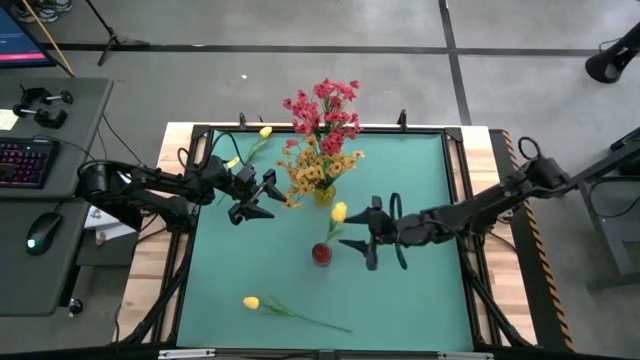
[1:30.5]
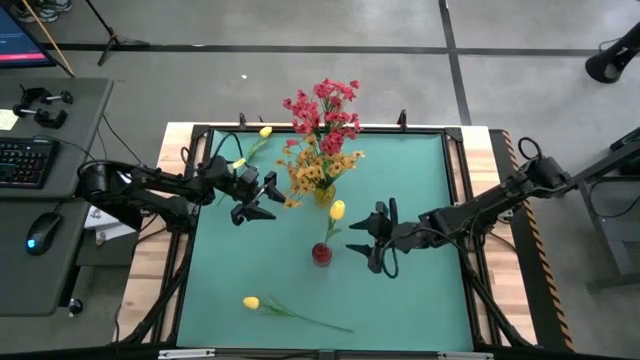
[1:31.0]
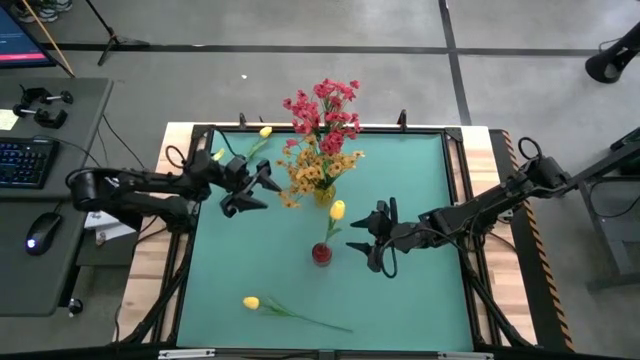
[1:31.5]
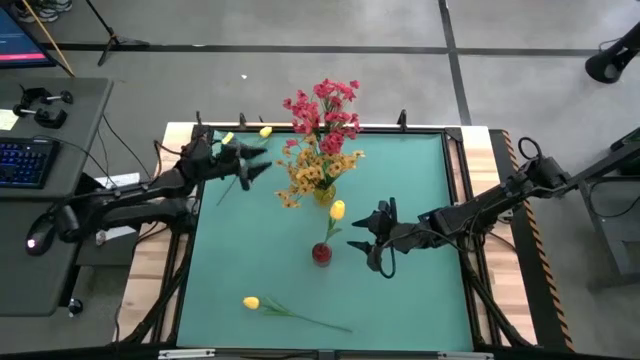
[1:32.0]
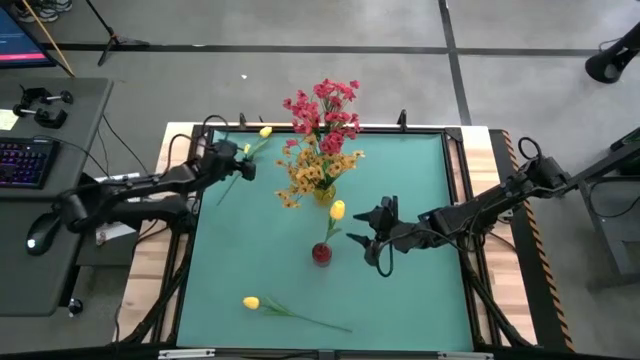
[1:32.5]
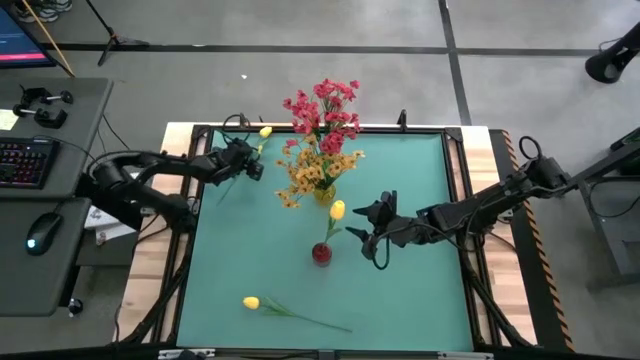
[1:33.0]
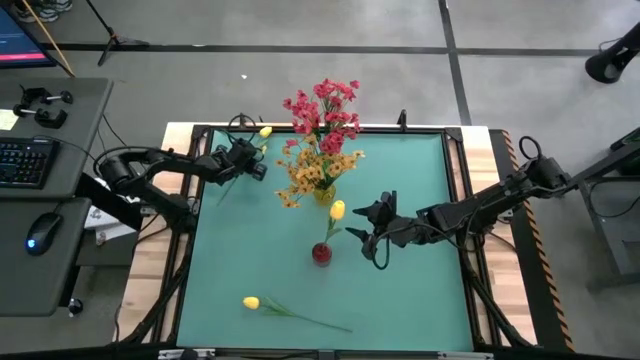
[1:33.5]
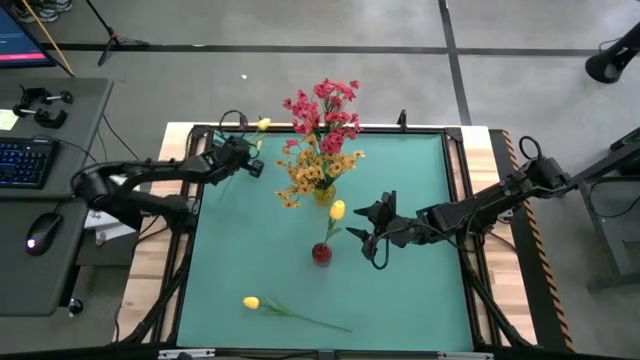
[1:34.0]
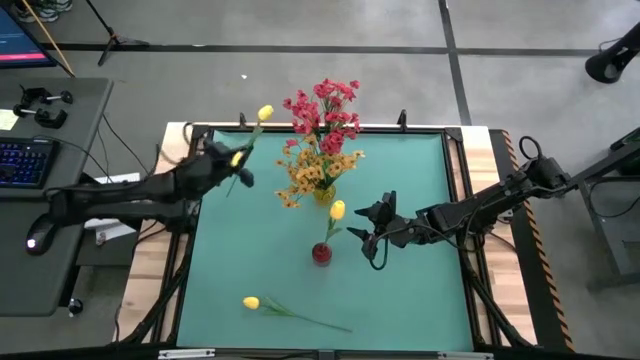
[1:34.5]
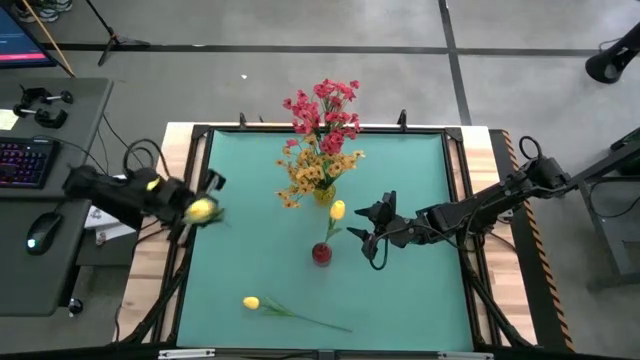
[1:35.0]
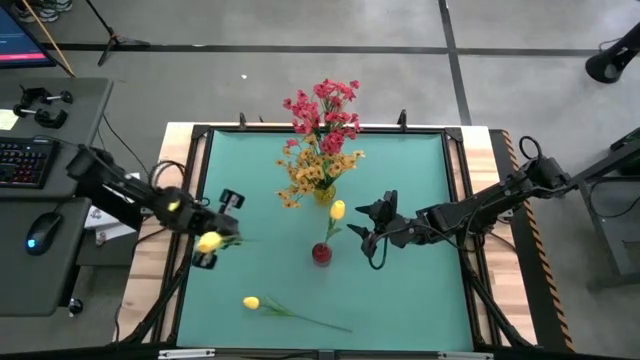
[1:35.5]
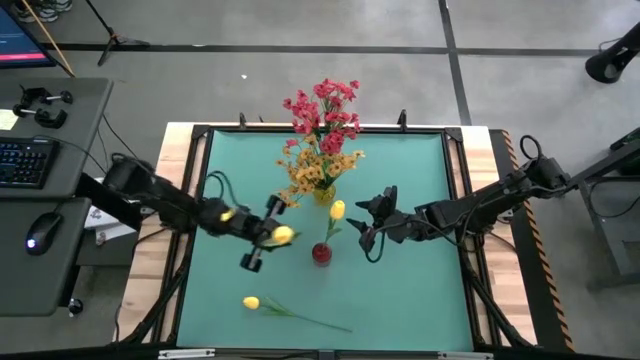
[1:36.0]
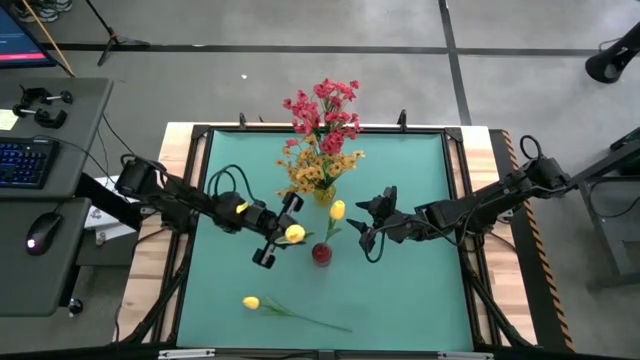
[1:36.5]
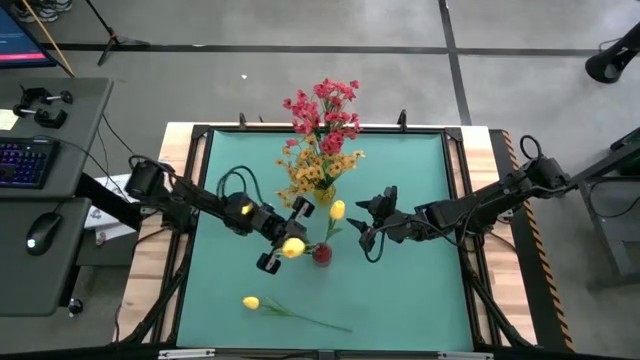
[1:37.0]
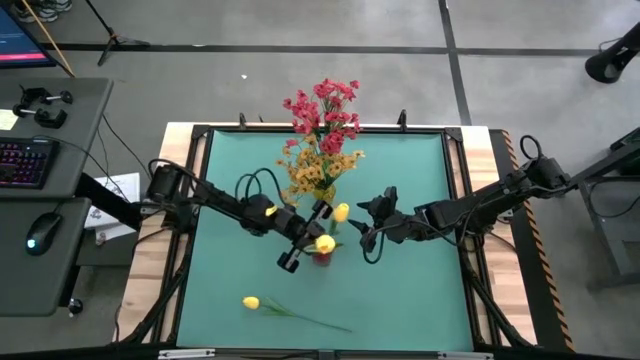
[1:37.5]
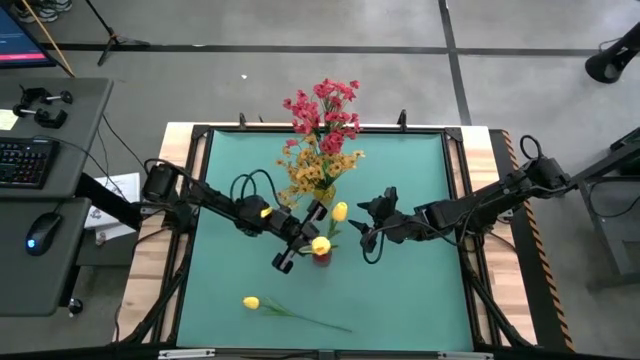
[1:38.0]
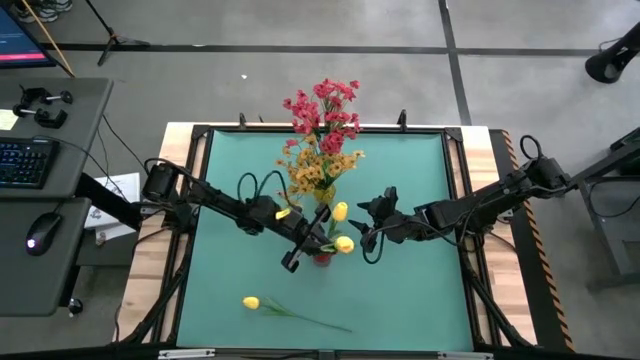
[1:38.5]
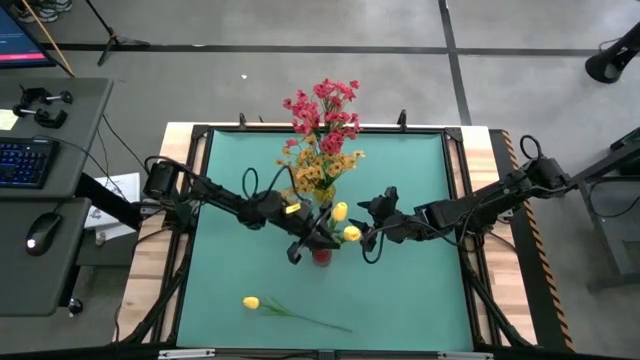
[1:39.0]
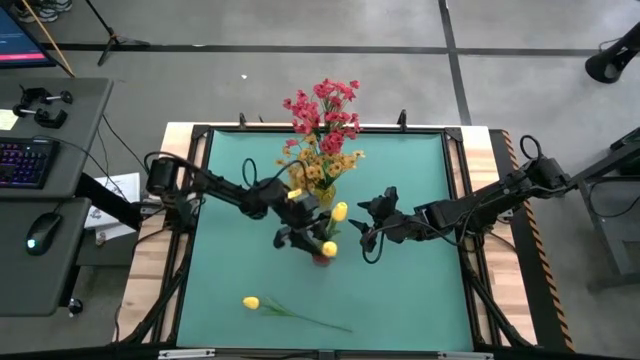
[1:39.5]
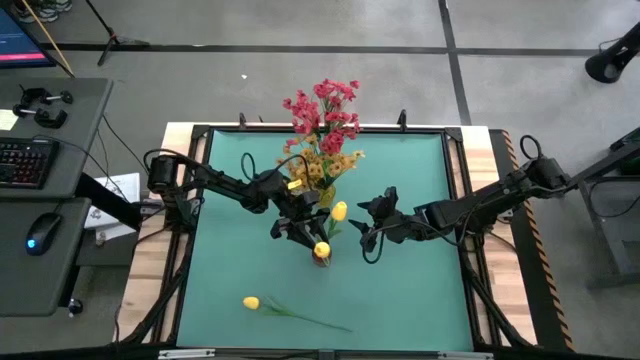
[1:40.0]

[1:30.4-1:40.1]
Task: Sort flowers into vase by color
Put the top yellow tulip into the red vase

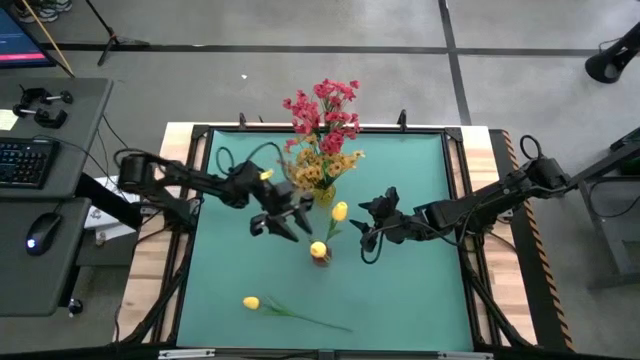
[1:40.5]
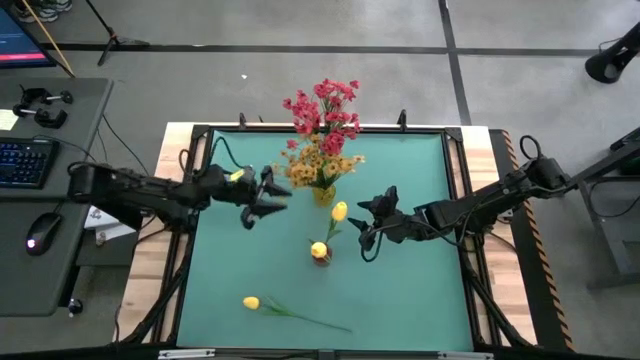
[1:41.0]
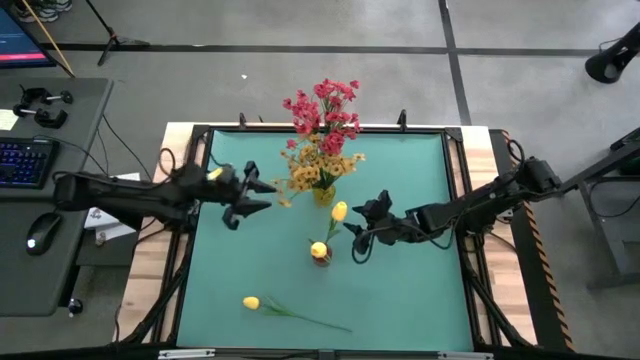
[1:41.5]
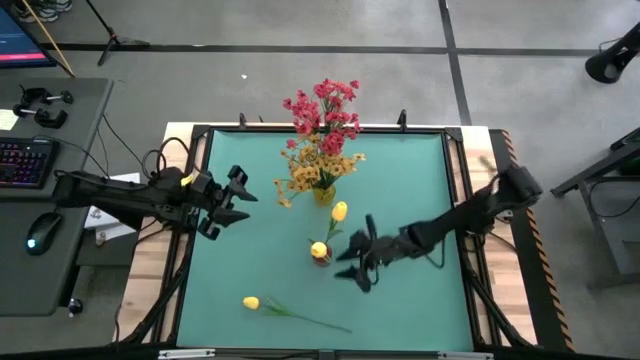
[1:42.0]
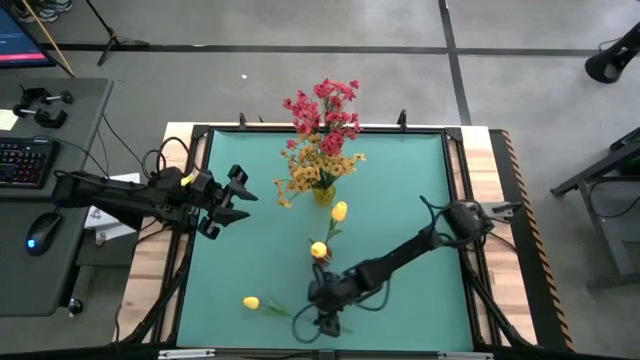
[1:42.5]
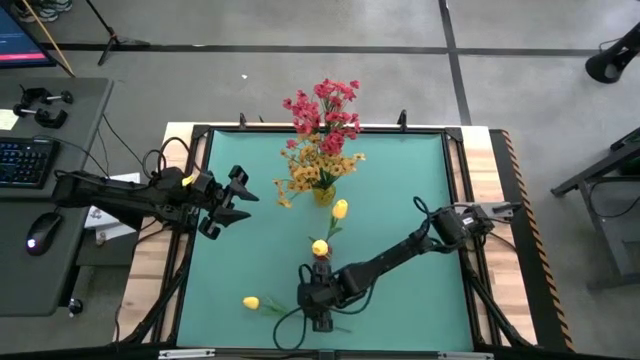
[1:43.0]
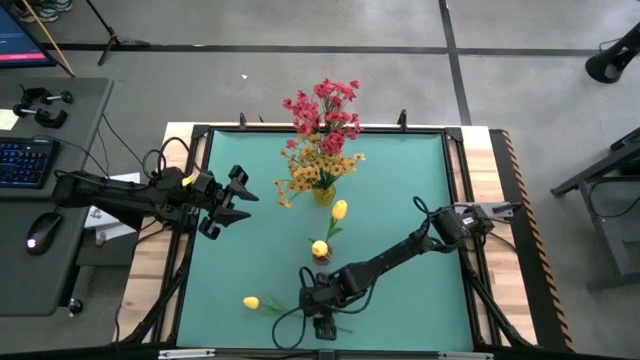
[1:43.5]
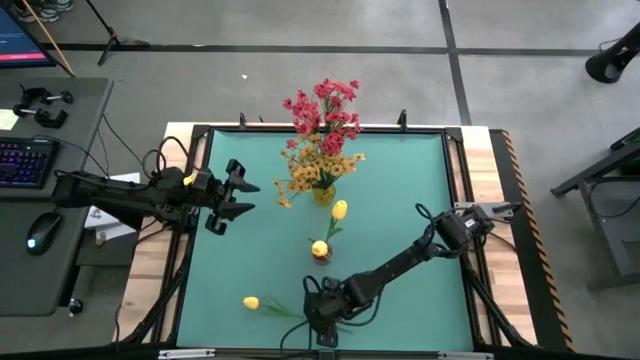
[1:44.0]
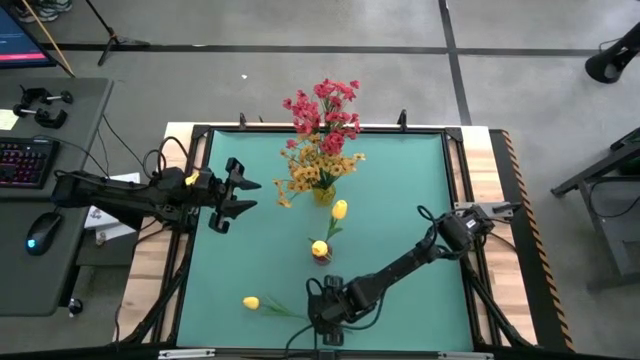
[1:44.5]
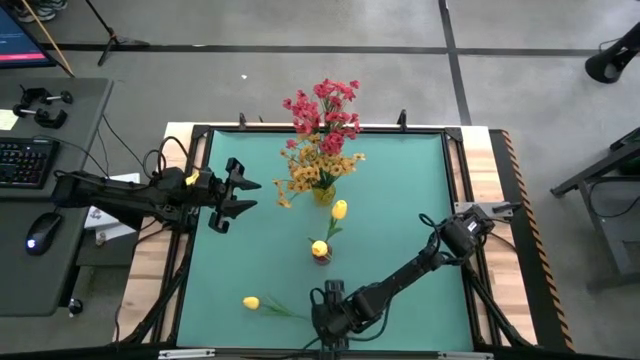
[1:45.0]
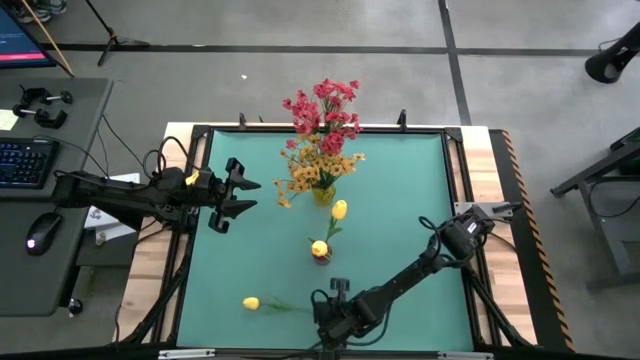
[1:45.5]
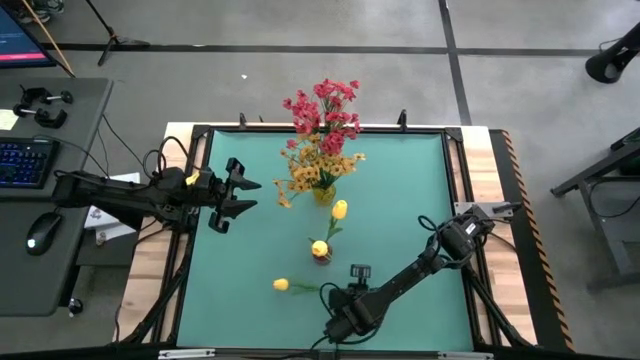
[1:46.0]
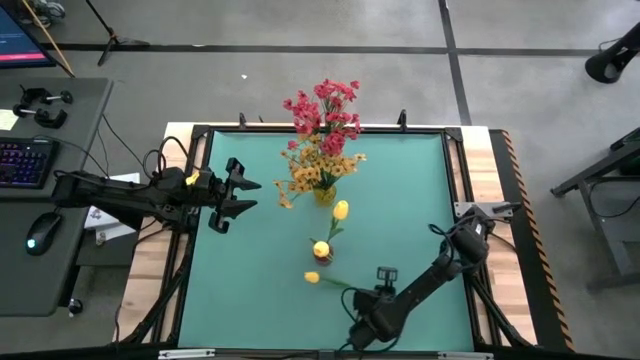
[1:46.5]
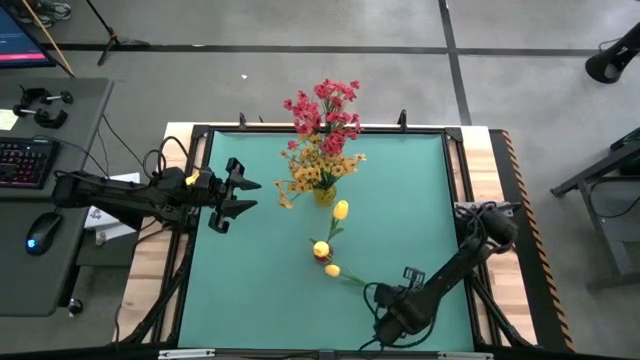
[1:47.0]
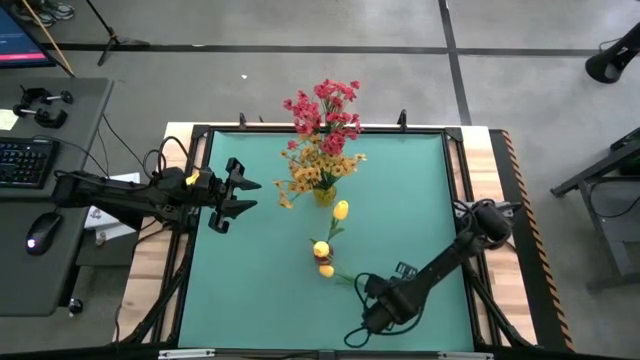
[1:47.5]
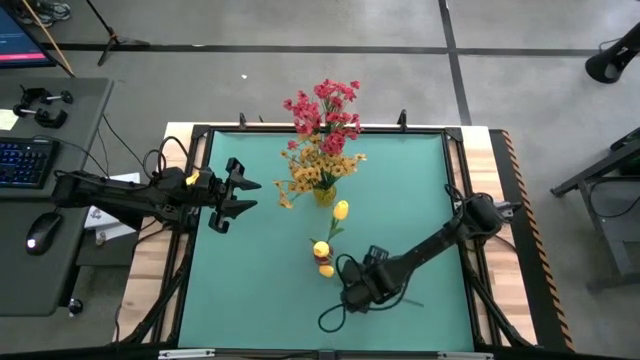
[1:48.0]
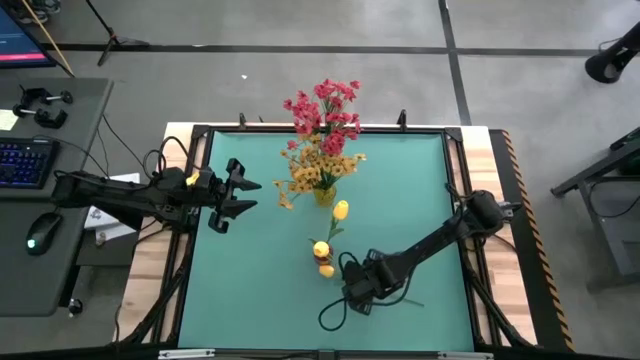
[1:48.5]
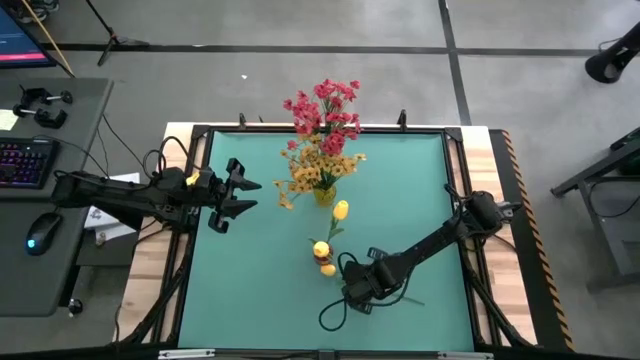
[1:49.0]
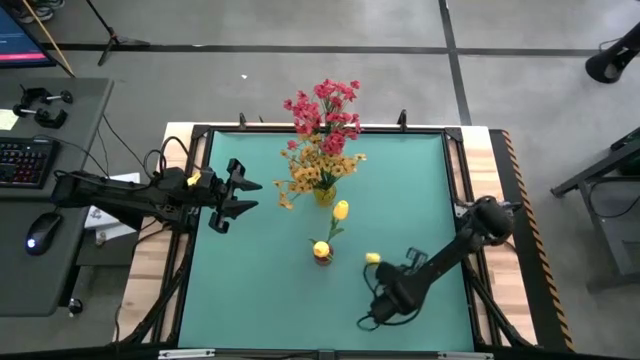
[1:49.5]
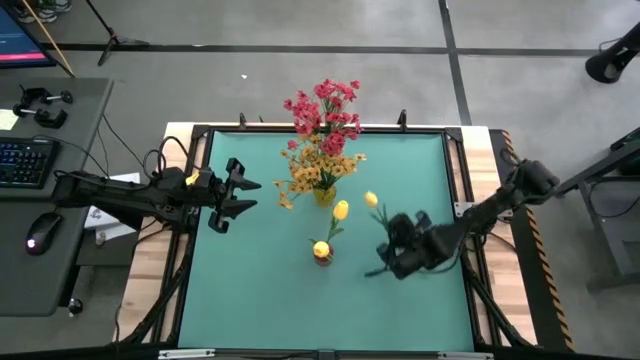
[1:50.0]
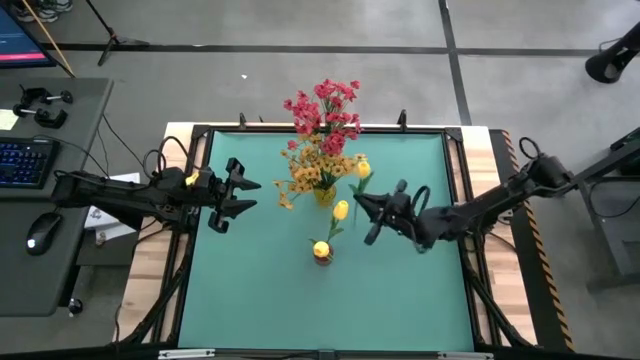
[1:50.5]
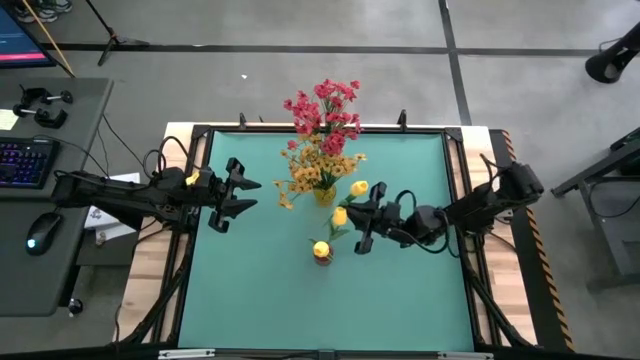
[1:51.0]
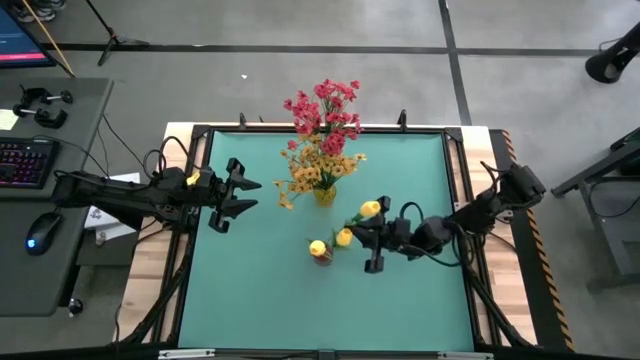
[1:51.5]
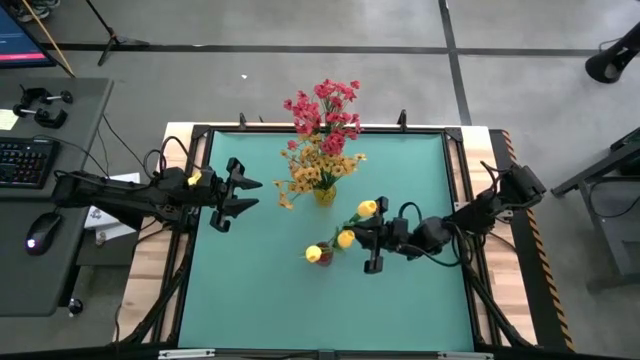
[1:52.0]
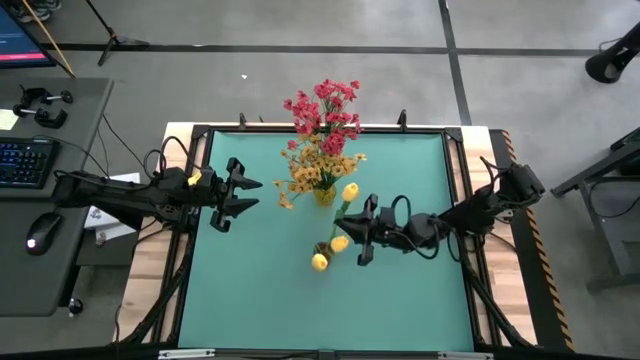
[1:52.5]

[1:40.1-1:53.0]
Put the yellow tulip into the red vase
